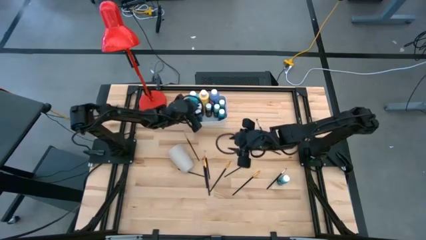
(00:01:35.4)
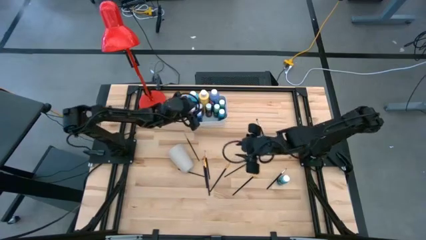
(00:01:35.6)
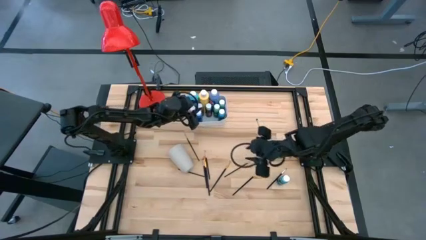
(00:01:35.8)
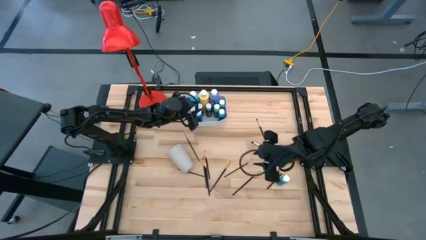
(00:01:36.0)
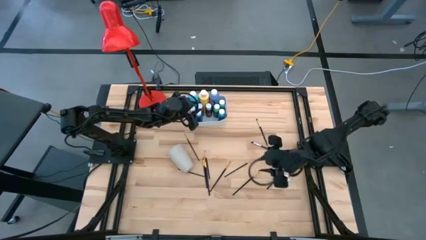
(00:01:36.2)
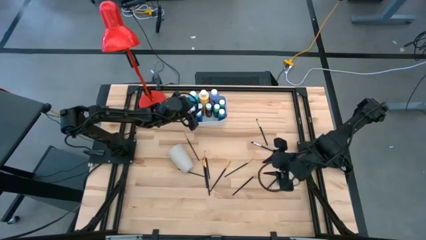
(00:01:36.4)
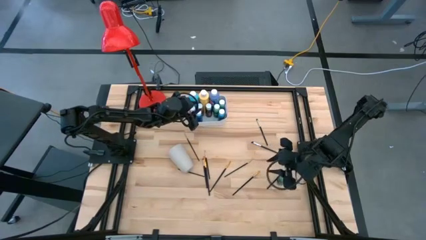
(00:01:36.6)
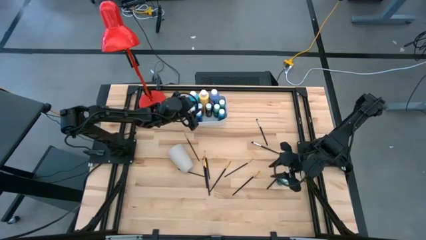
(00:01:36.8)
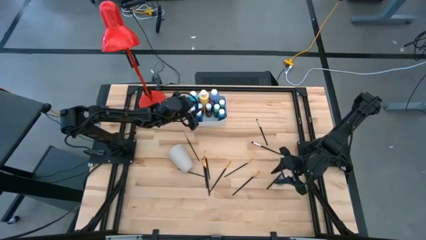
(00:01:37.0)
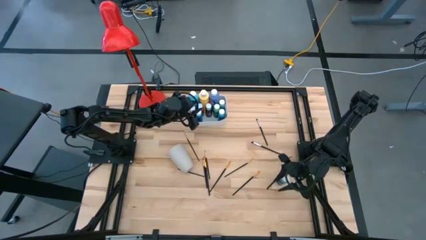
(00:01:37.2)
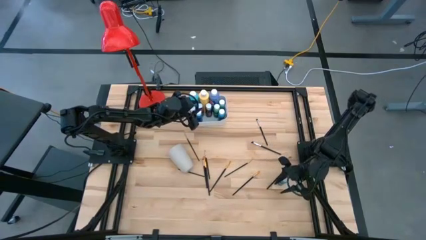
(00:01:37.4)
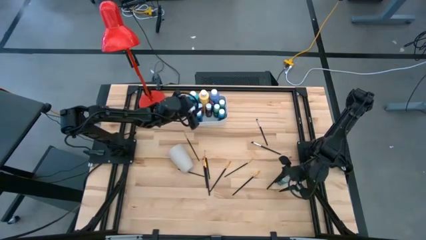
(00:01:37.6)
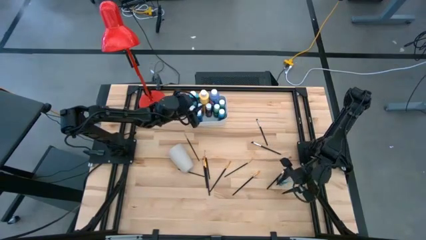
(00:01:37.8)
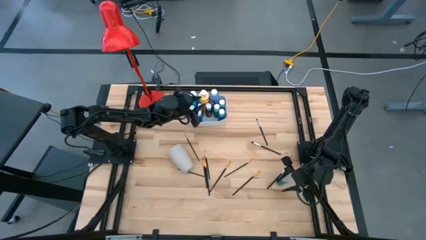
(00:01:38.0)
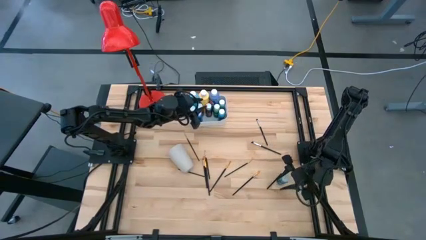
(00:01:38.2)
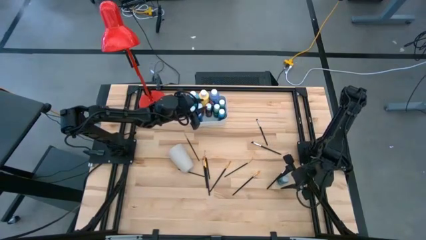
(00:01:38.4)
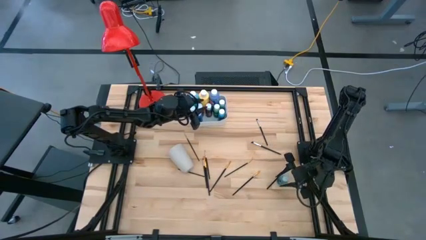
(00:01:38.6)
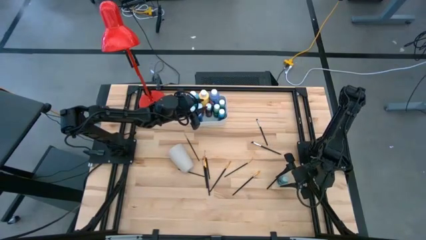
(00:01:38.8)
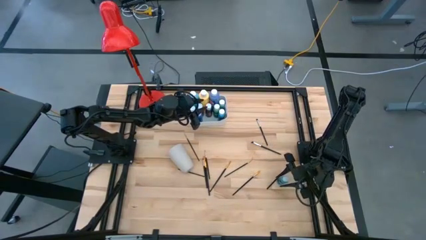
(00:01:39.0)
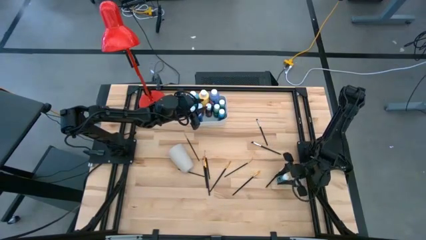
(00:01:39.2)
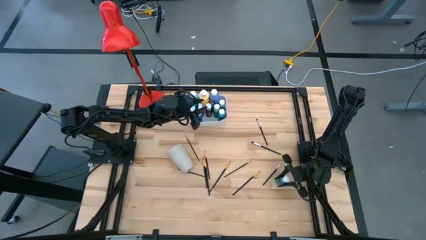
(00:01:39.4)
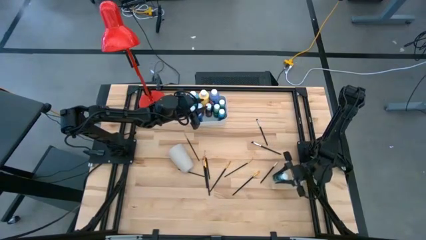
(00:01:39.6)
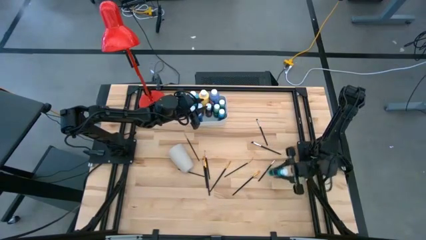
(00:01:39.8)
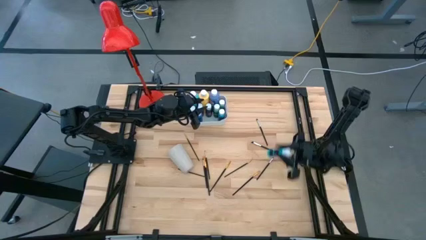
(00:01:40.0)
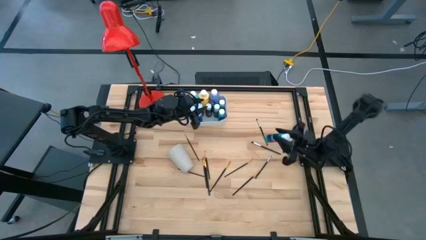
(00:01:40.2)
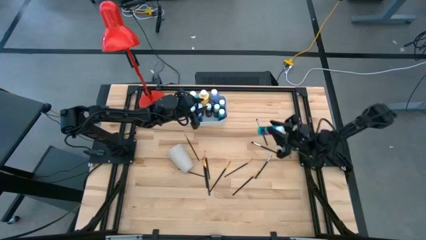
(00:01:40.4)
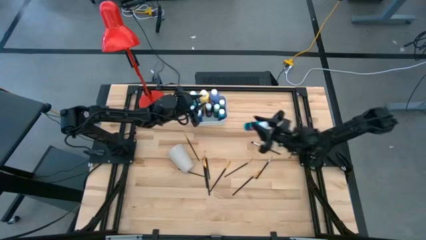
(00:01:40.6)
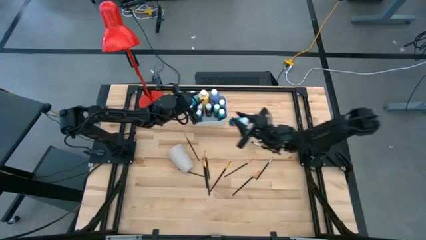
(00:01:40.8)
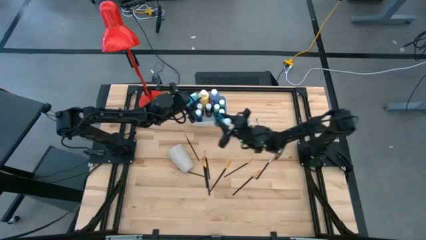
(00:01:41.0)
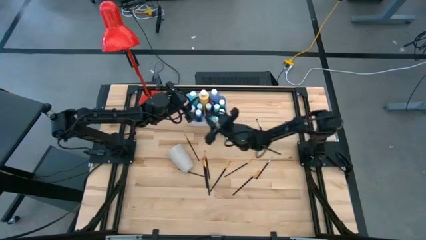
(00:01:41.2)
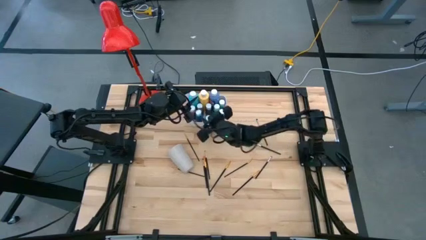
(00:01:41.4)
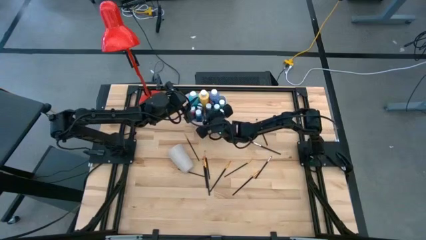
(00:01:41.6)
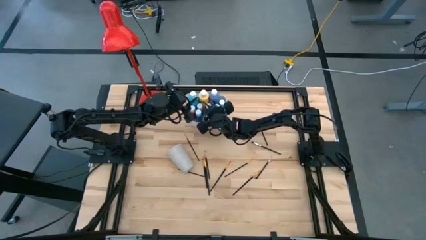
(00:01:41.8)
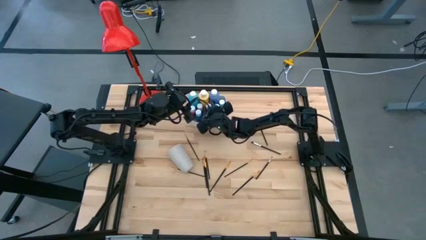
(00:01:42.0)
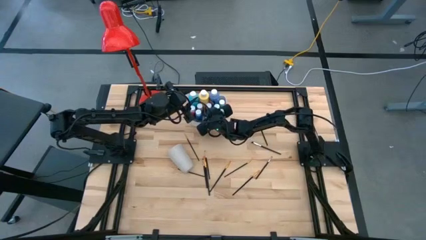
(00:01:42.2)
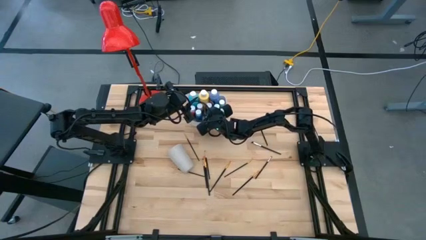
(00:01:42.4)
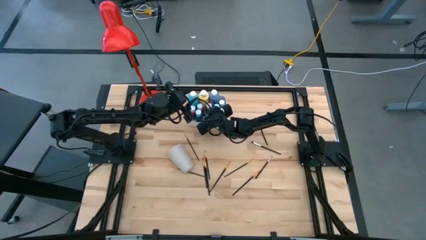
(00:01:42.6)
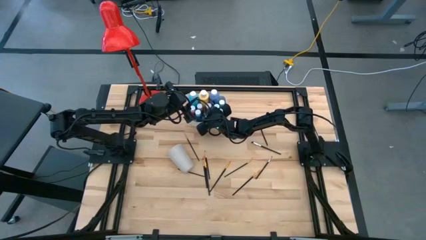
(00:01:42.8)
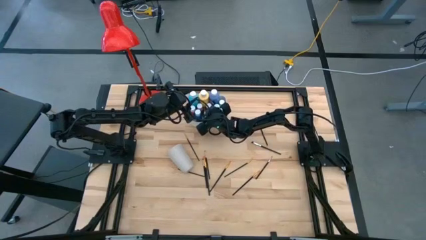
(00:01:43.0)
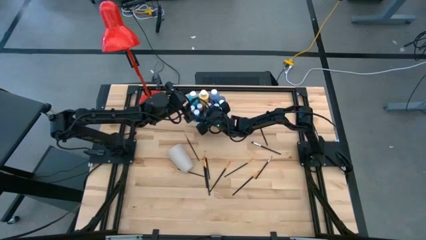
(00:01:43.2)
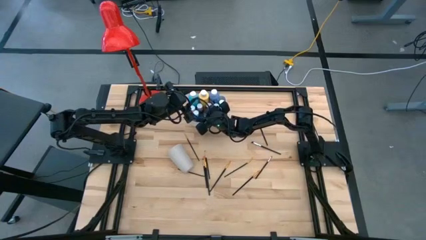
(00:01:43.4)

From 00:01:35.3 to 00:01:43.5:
Task: Pick & Place Paint Supplies
Put the green paint bottle into the white bin

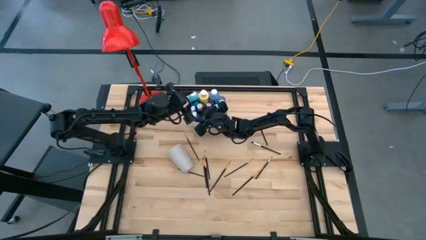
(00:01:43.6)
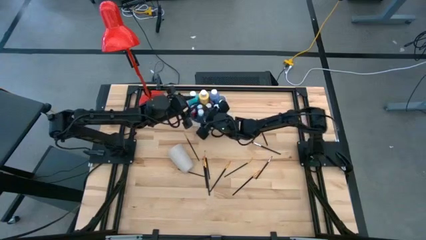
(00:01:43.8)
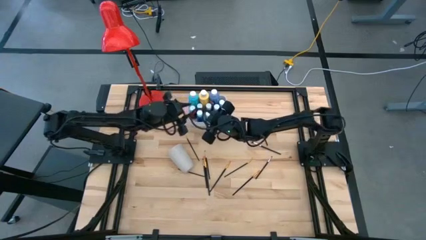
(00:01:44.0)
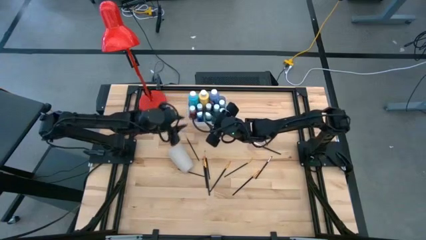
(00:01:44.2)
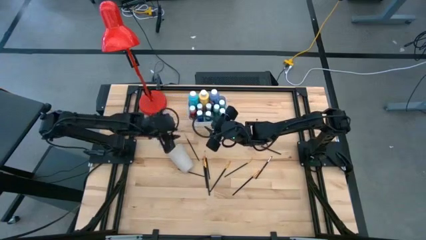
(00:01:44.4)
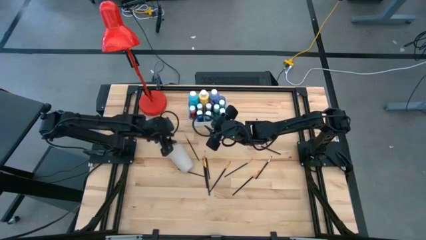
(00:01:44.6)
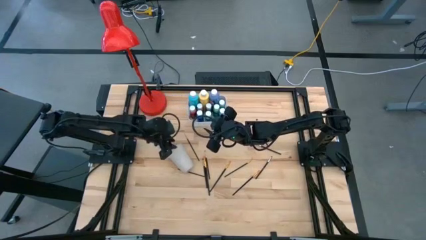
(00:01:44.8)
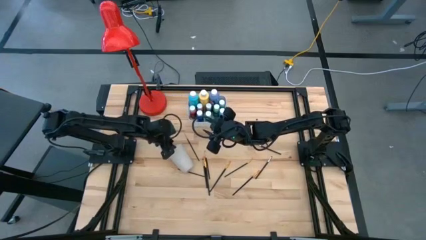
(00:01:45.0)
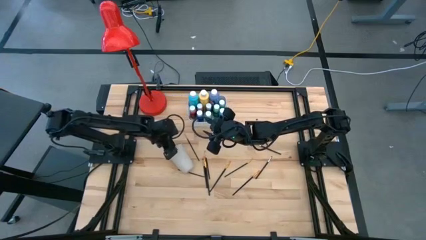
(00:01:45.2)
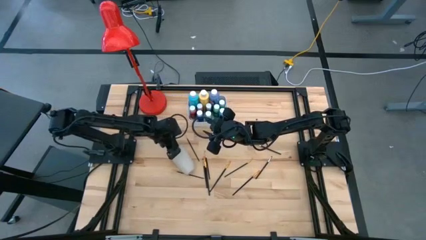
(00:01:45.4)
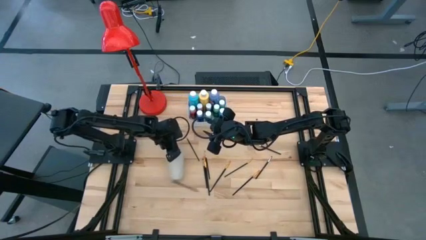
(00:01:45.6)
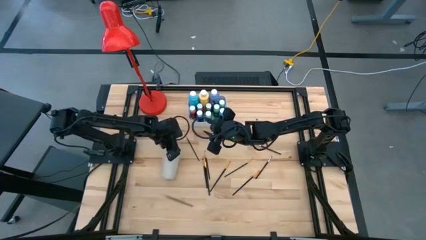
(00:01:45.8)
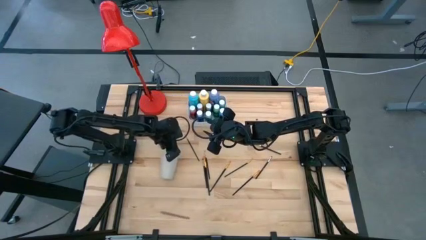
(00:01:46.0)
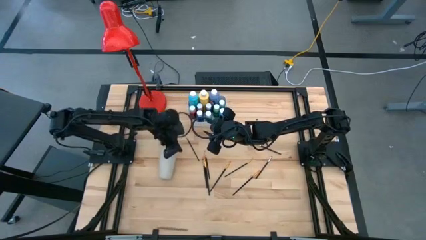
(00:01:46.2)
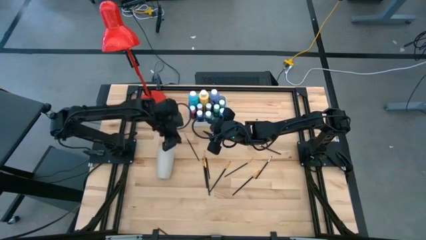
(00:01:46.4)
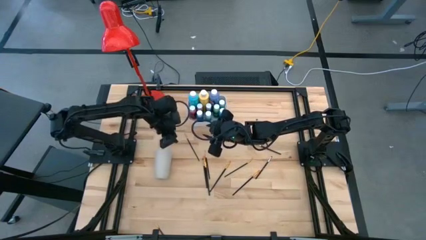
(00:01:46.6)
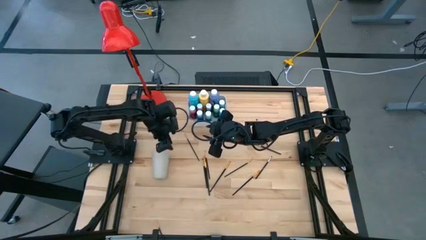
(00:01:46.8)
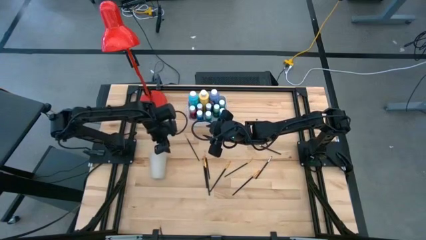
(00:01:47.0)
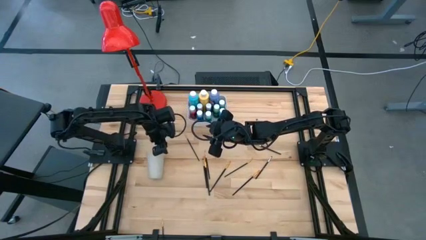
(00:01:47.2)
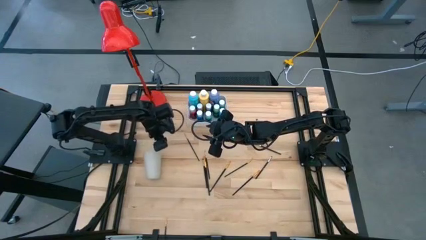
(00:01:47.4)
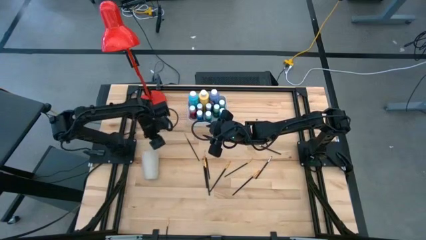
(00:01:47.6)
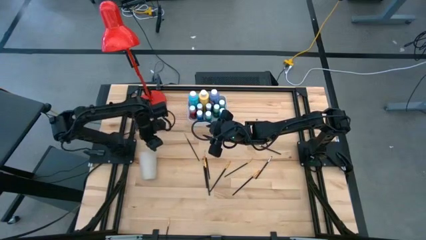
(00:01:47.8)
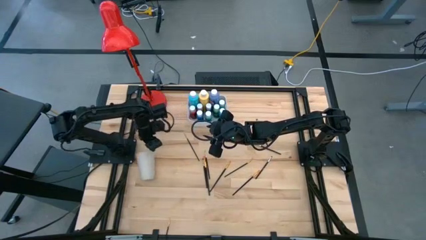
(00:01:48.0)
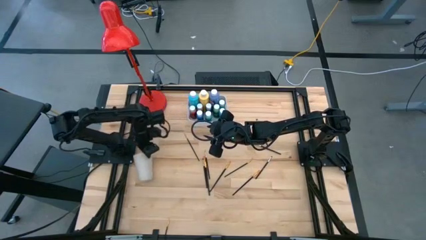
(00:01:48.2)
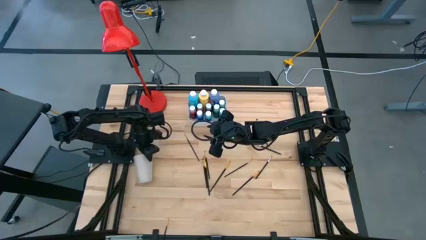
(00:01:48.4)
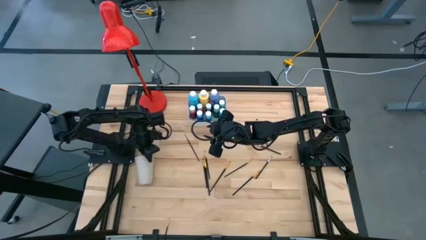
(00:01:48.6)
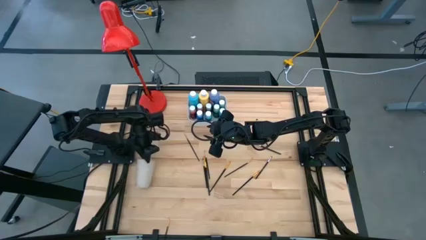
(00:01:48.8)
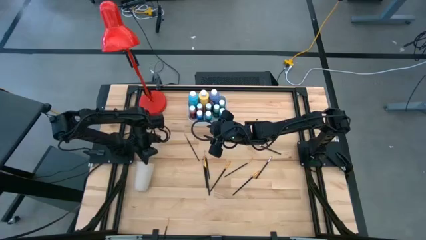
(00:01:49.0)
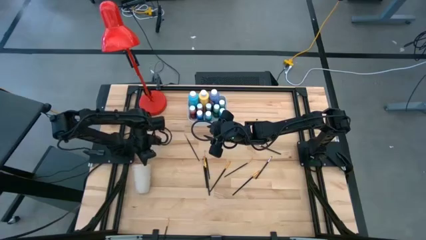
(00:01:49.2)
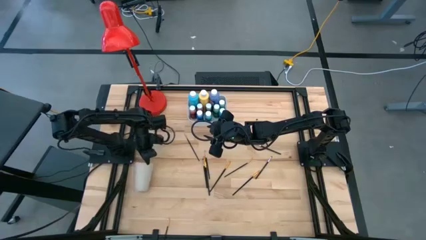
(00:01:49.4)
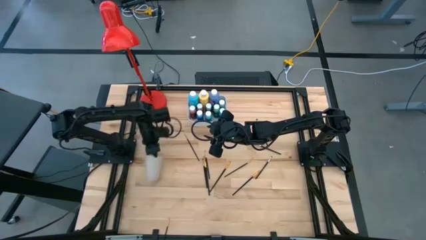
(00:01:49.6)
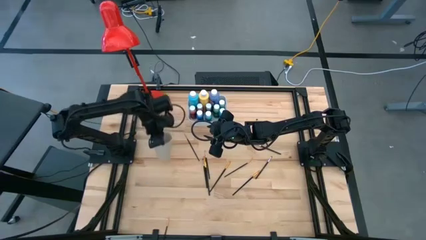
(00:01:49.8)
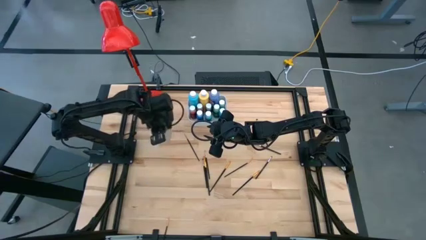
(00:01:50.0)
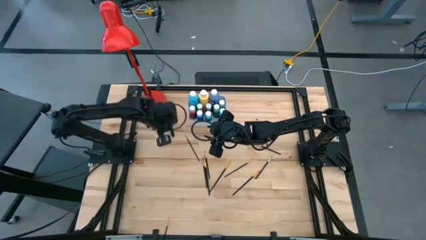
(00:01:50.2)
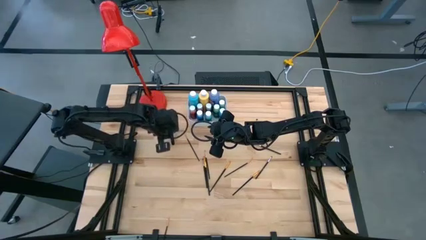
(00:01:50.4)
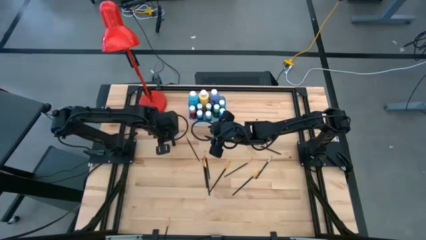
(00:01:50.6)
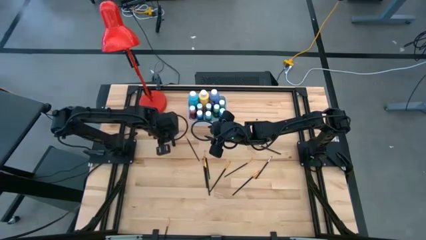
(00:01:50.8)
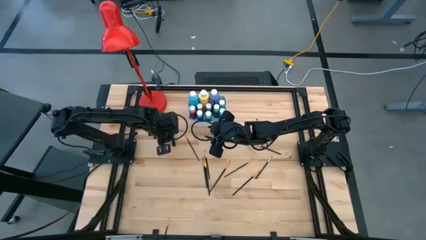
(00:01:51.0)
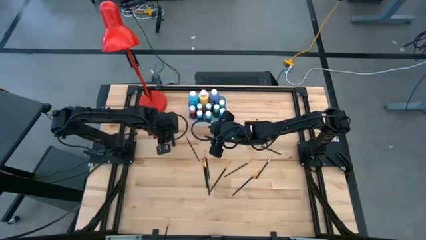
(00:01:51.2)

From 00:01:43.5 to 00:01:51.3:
Prepare the white cup
